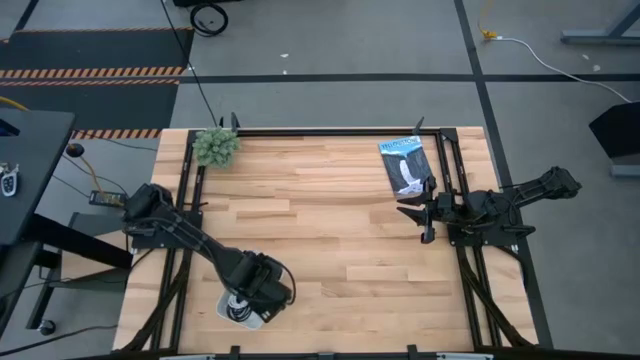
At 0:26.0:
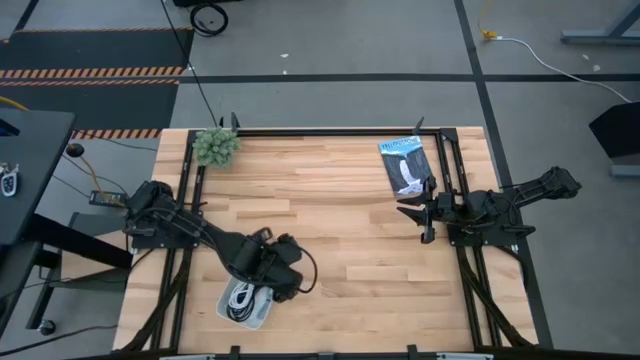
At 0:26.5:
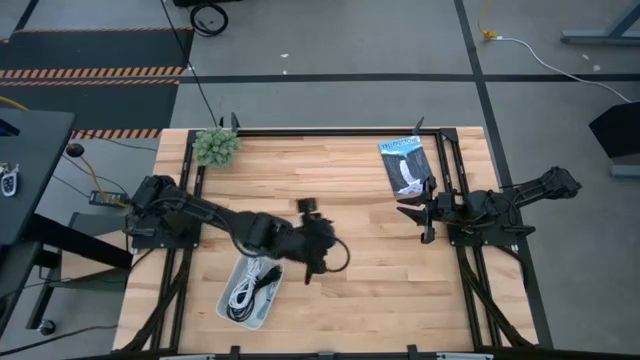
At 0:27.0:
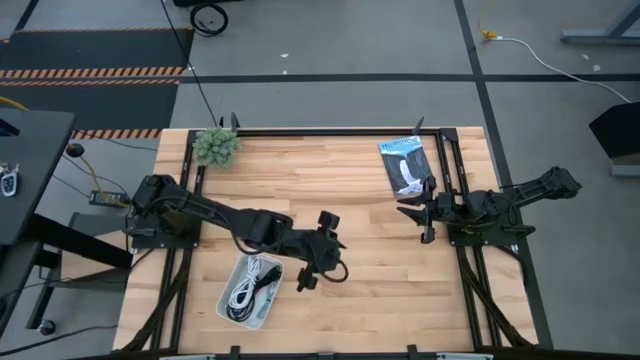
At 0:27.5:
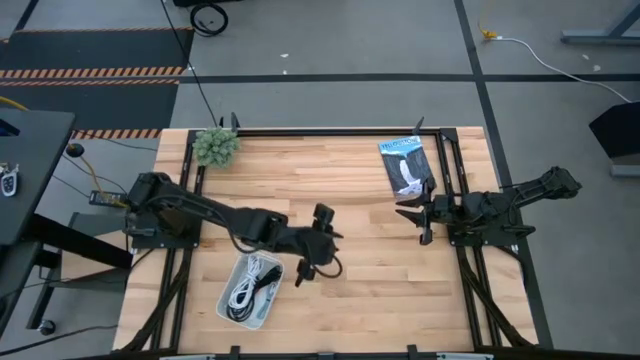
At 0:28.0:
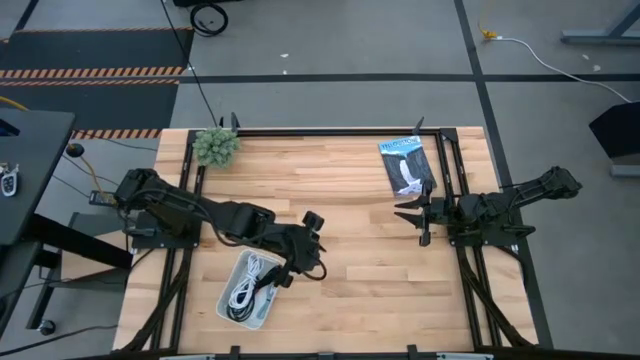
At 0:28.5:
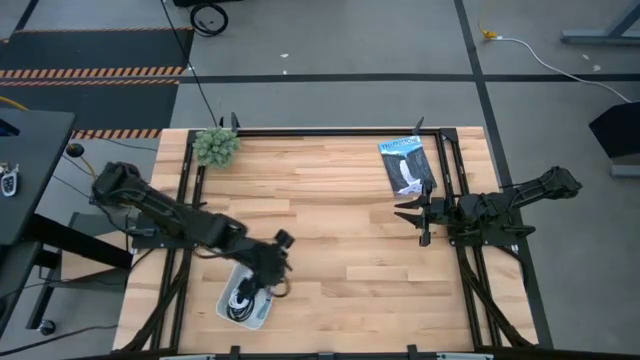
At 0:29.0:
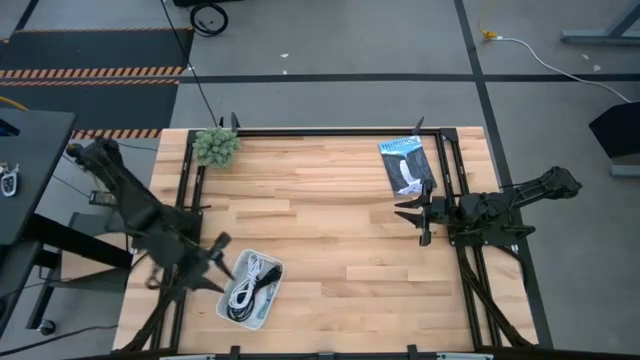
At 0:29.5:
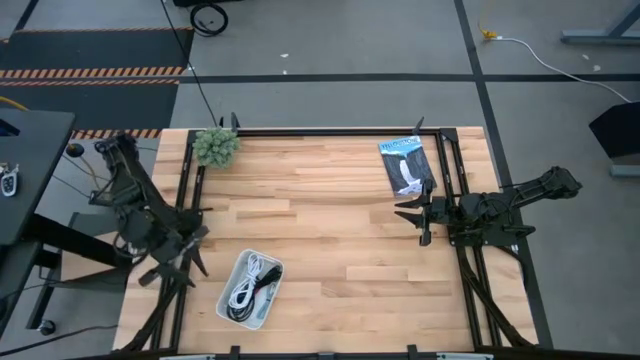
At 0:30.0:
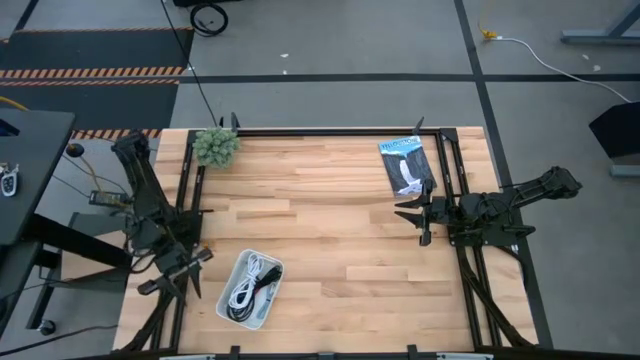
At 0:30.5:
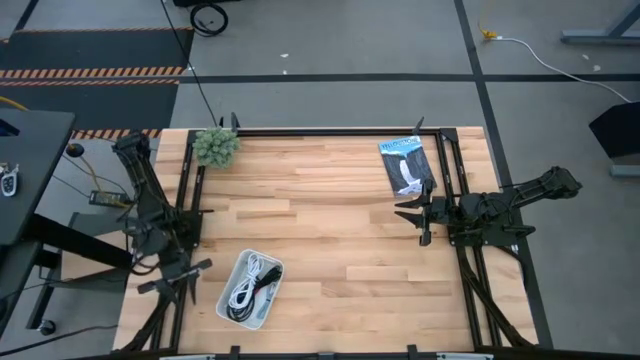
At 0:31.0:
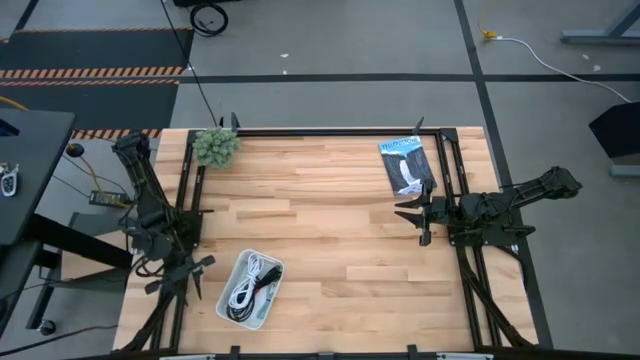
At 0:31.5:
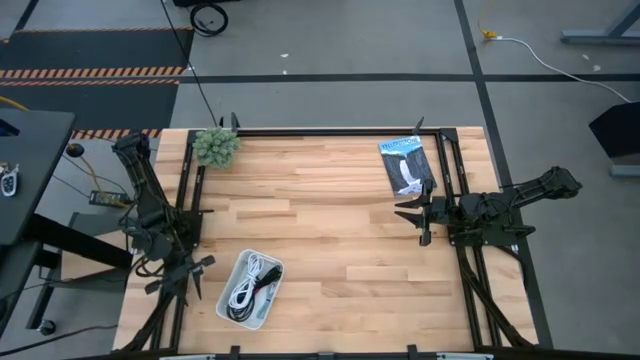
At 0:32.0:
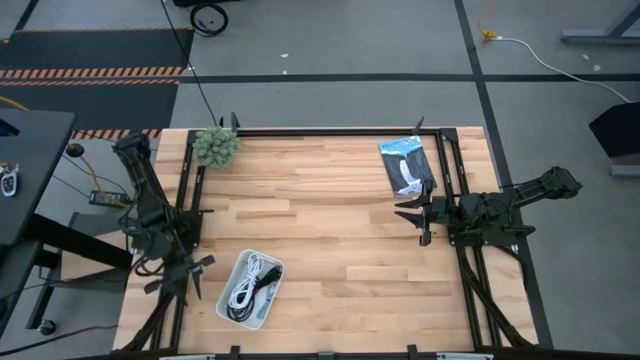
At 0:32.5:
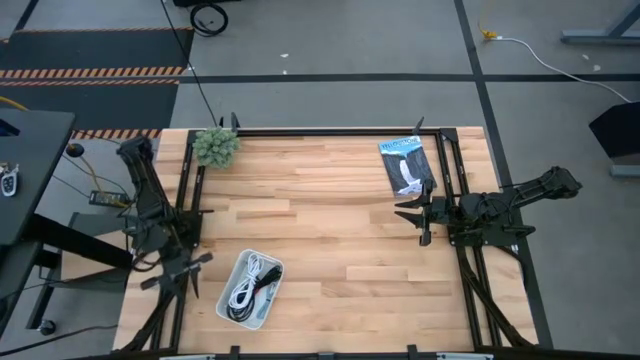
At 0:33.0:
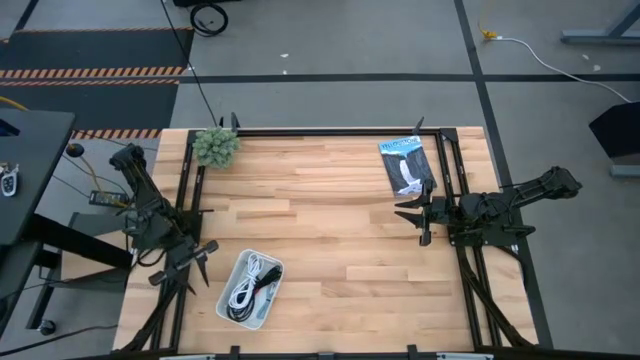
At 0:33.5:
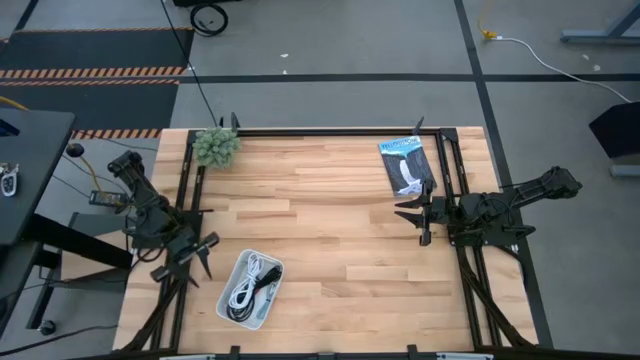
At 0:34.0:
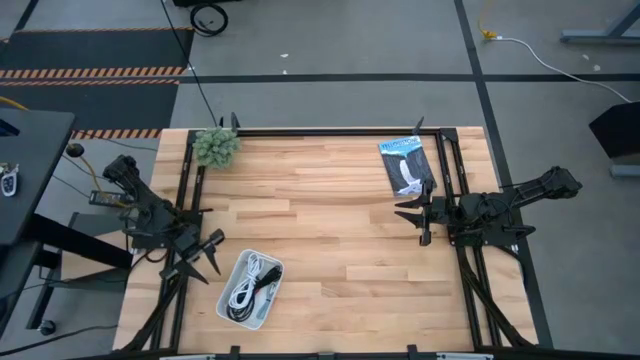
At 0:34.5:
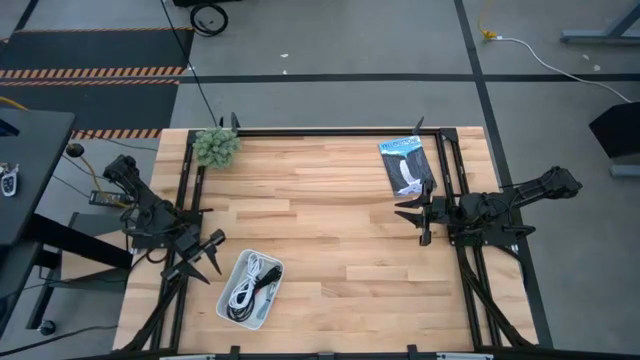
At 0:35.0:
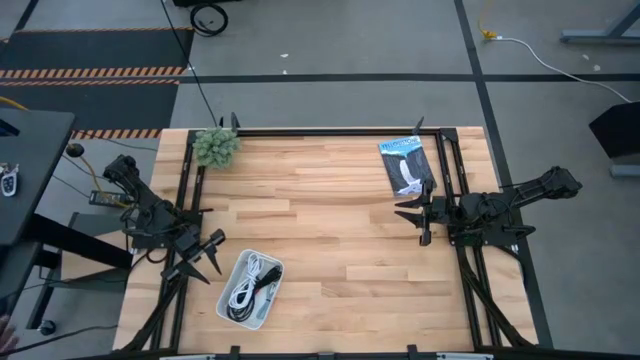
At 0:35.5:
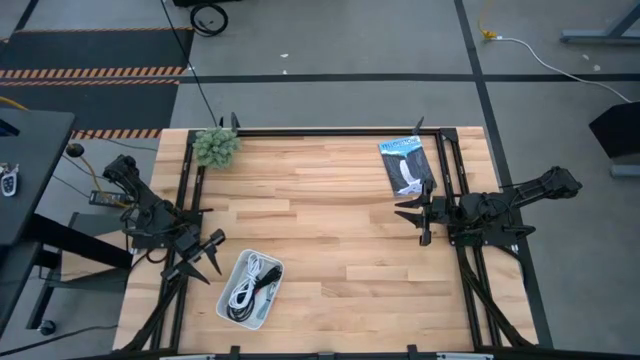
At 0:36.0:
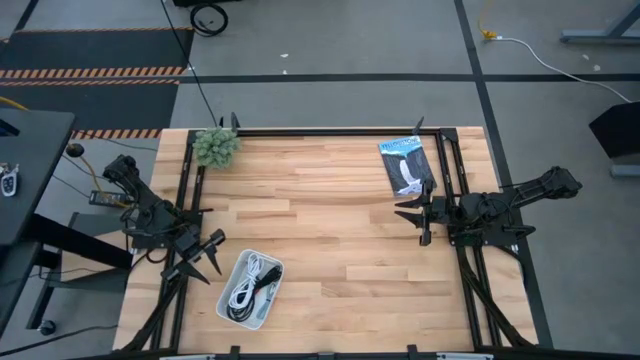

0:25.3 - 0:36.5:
Task: Pick and place USB-C Cables
Return to Home Position

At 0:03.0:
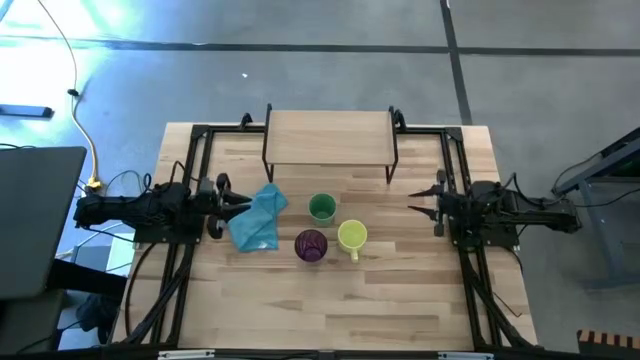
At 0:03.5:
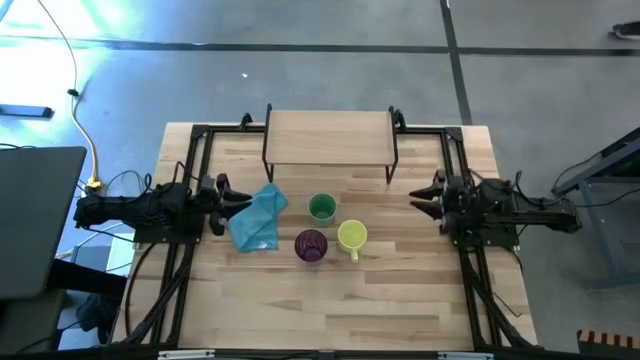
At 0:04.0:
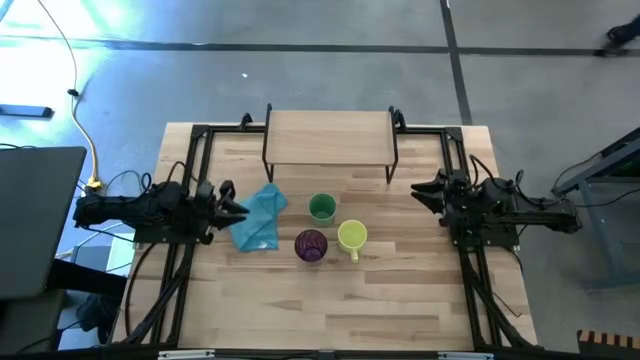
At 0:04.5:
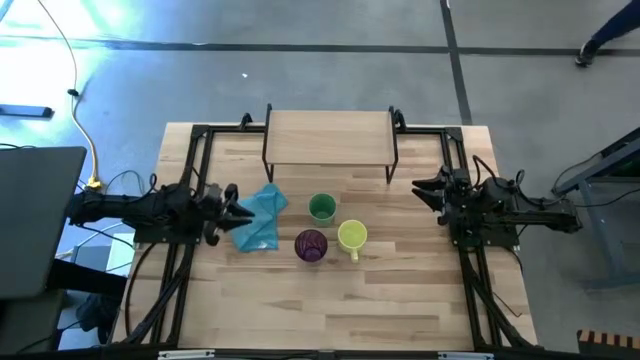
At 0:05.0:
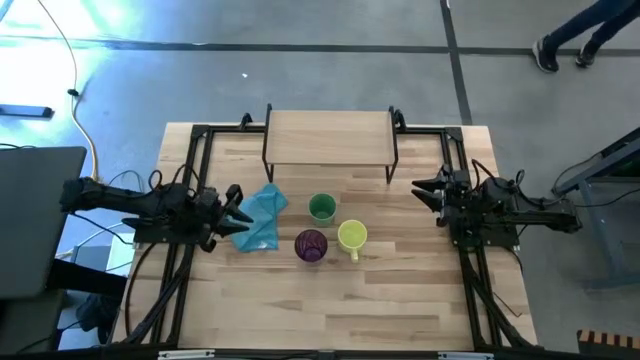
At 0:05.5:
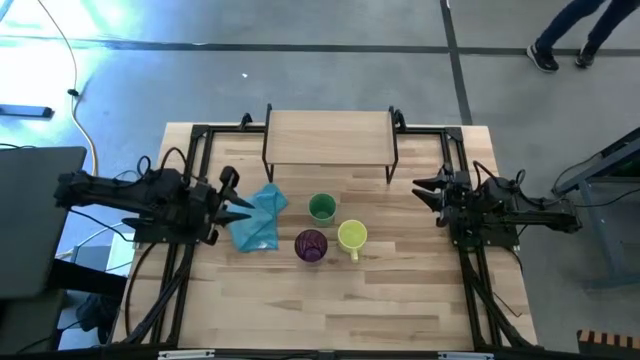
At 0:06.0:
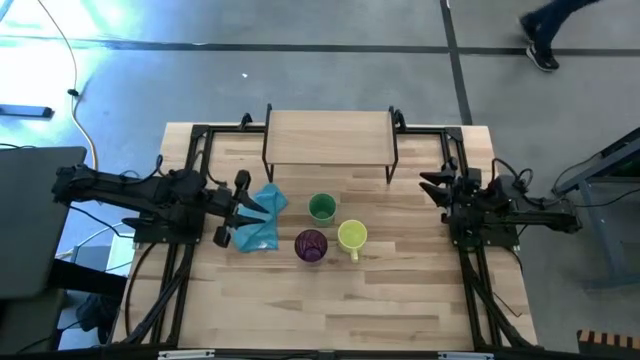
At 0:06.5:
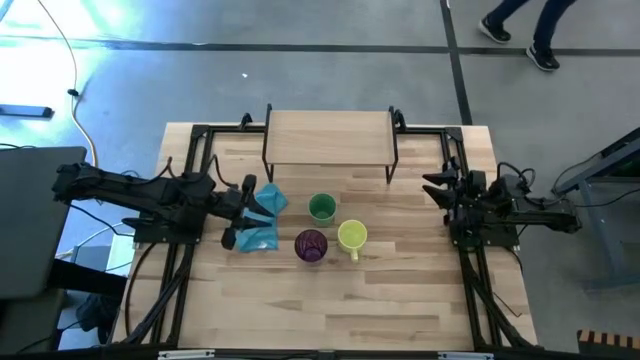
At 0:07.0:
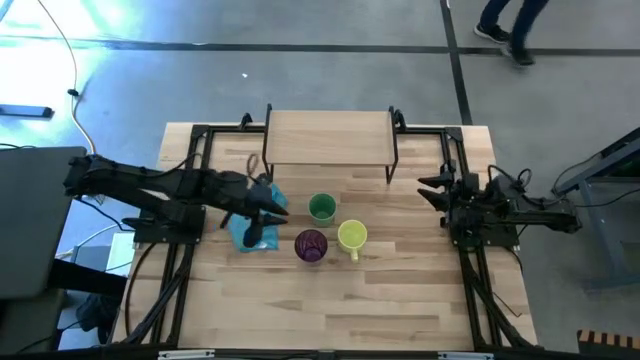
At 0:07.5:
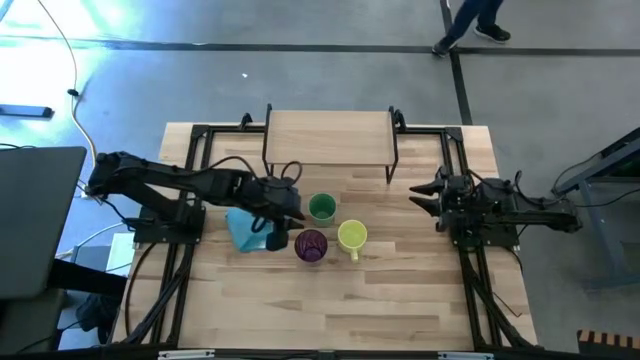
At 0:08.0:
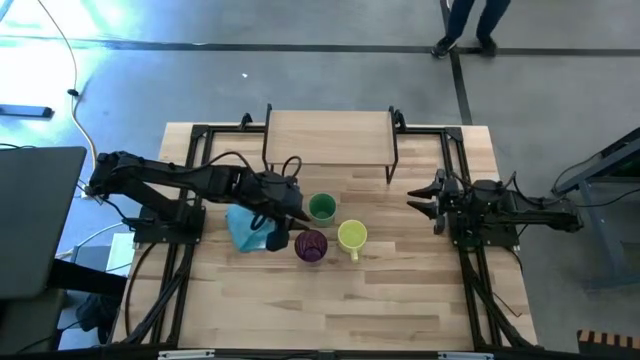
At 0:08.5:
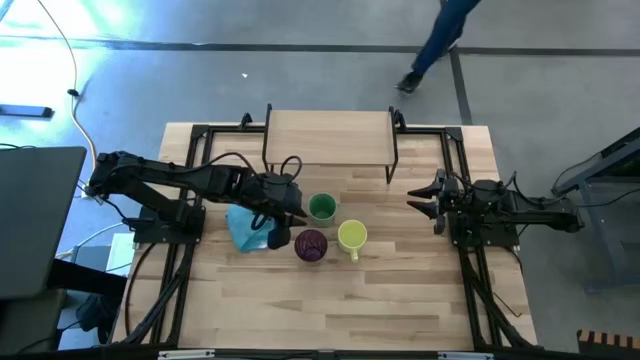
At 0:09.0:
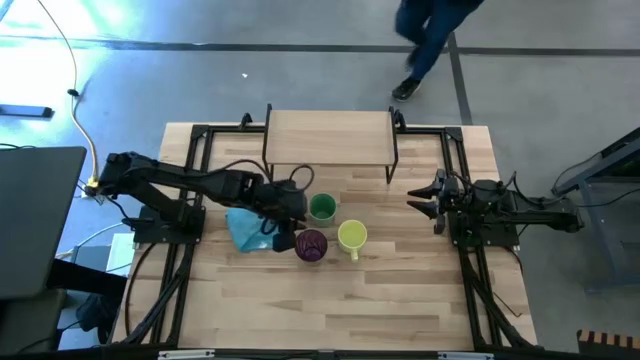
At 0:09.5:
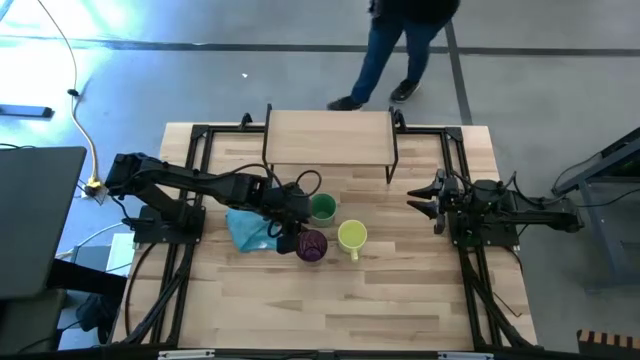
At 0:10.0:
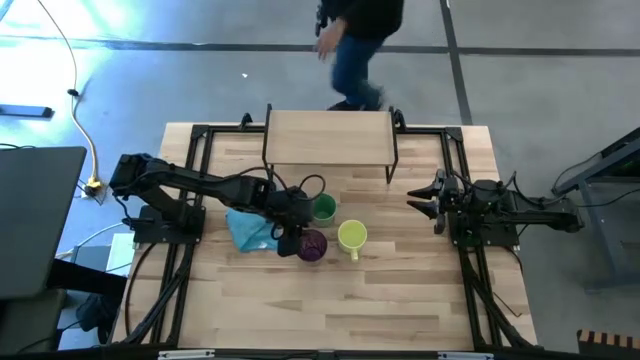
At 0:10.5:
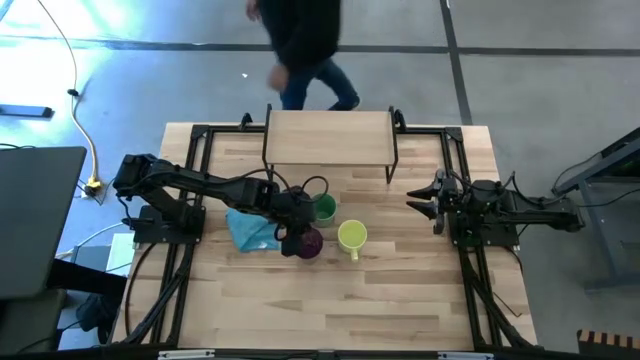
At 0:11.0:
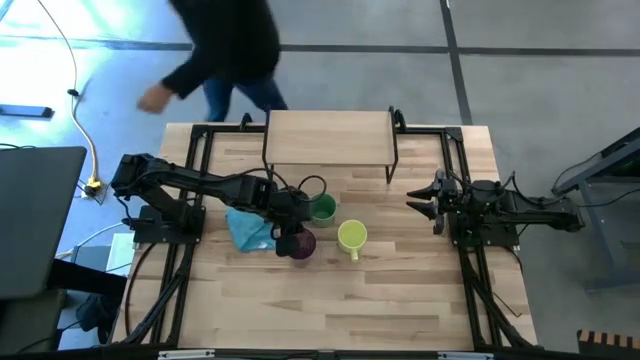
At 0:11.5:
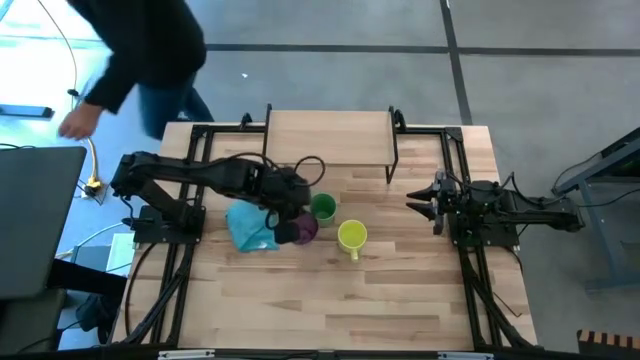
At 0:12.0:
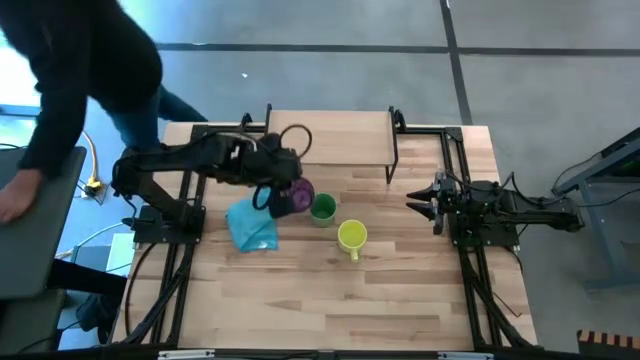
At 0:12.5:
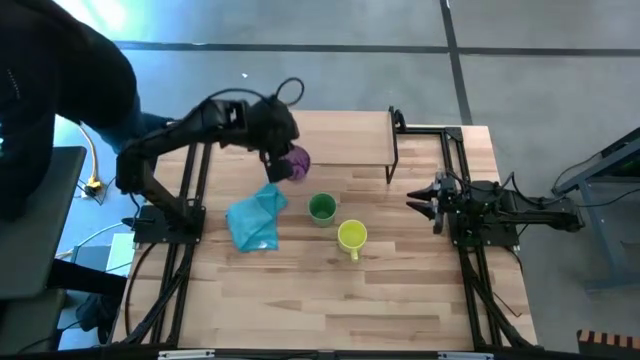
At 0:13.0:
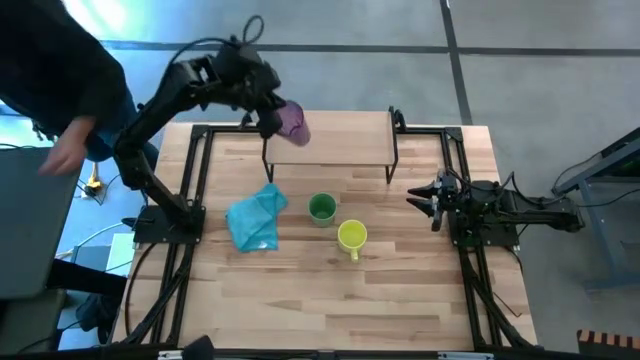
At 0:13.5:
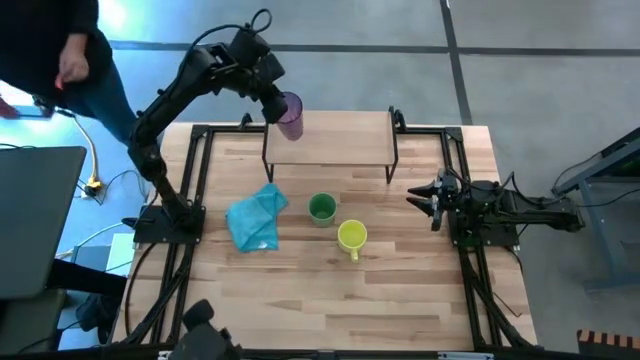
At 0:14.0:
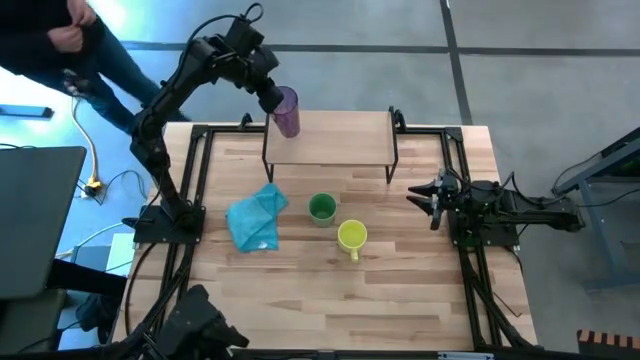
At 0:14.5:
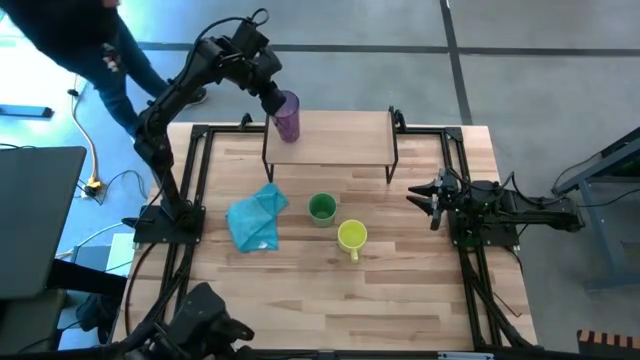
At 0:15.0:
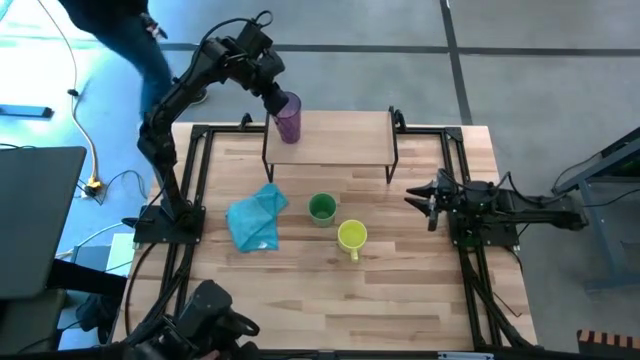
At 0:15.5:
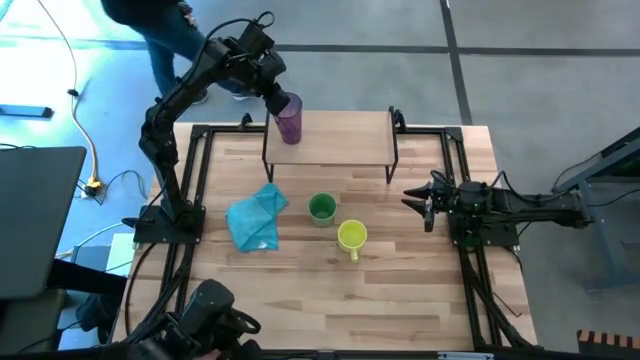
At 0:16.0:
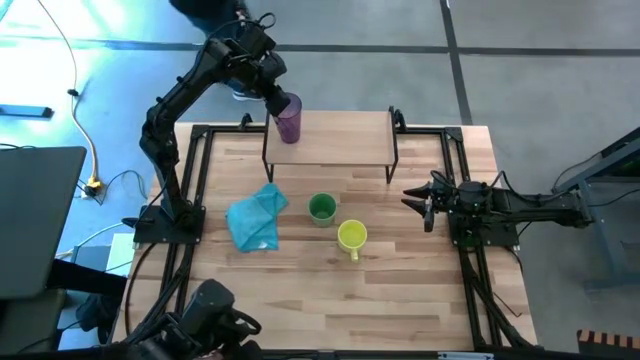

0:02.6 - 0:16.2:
Task: Stack small to large cups/mugs on shelf
Put the violet cup on the shelf
